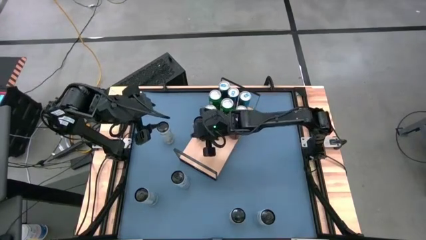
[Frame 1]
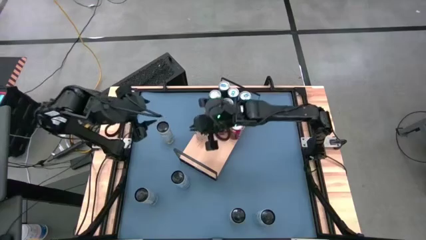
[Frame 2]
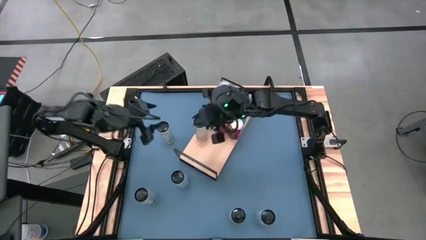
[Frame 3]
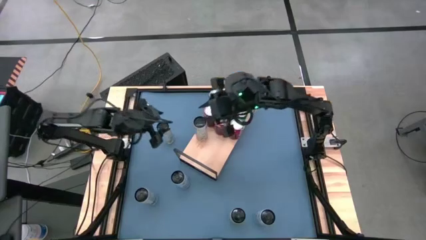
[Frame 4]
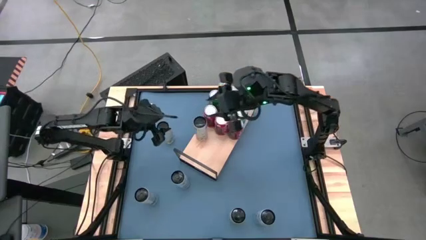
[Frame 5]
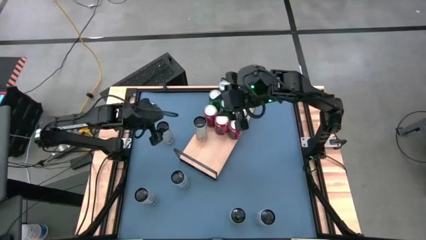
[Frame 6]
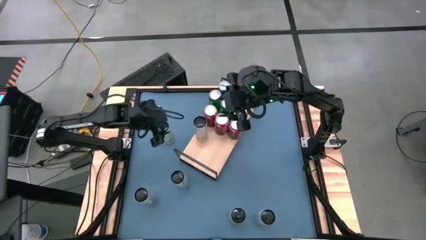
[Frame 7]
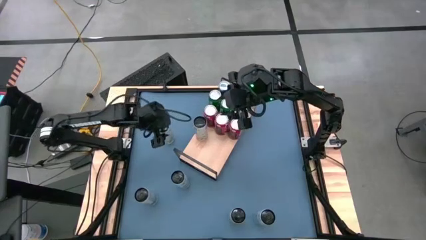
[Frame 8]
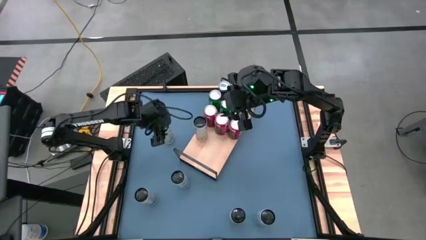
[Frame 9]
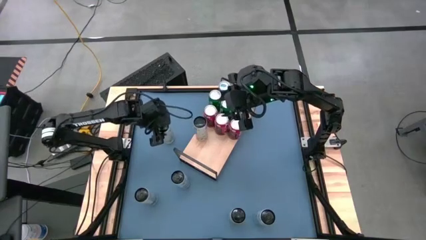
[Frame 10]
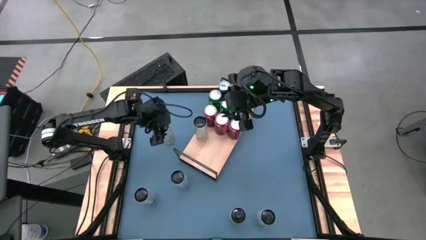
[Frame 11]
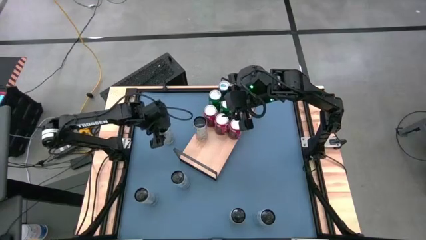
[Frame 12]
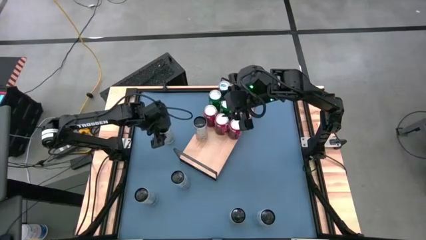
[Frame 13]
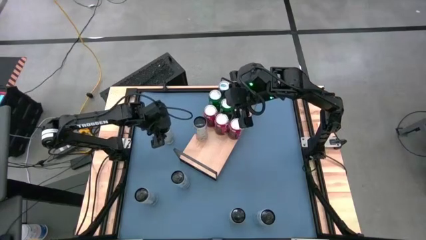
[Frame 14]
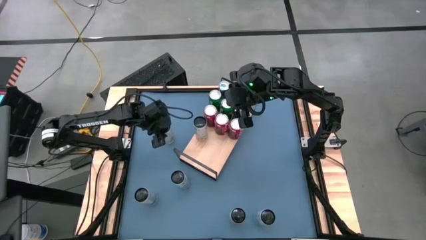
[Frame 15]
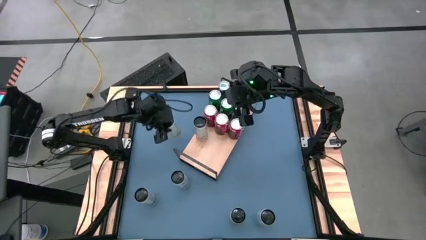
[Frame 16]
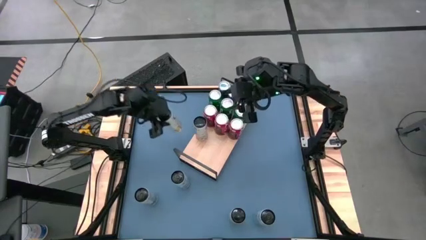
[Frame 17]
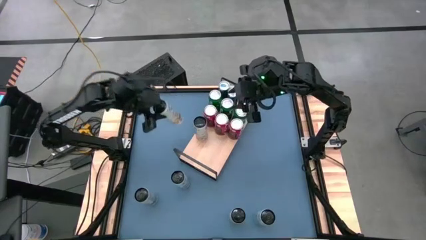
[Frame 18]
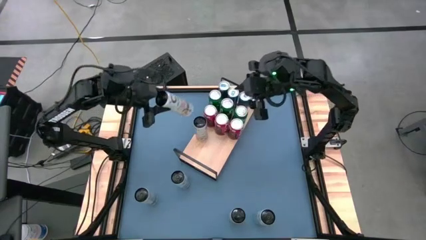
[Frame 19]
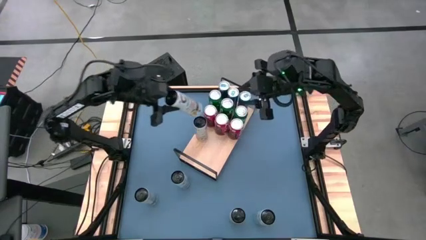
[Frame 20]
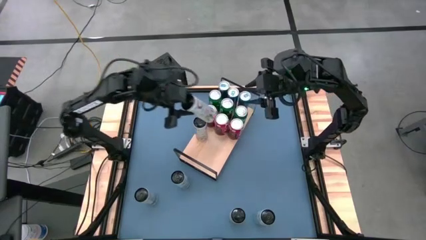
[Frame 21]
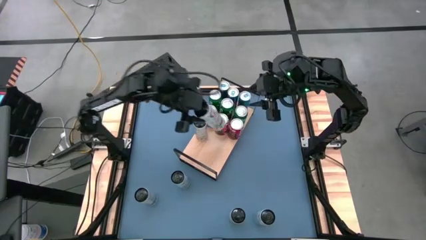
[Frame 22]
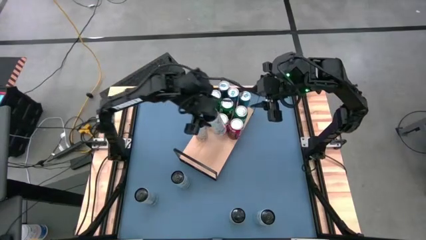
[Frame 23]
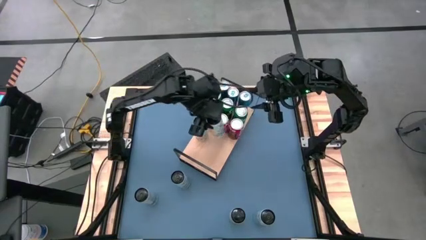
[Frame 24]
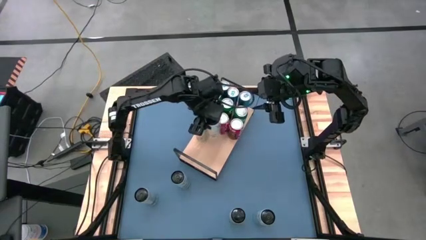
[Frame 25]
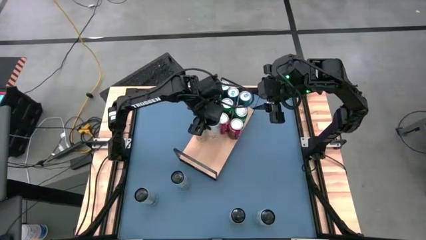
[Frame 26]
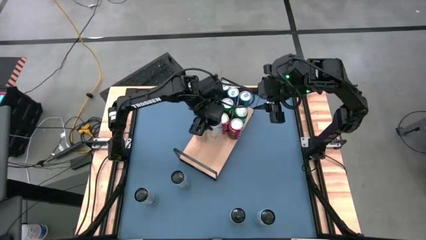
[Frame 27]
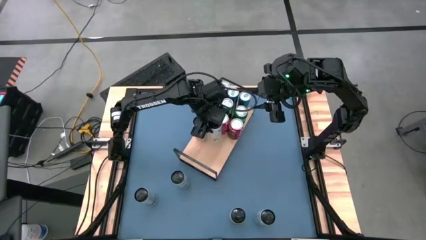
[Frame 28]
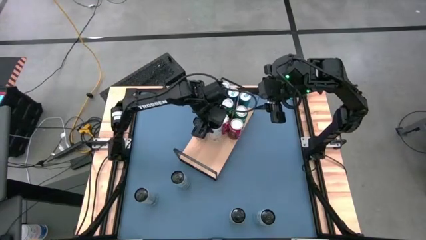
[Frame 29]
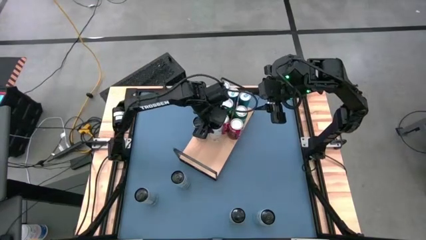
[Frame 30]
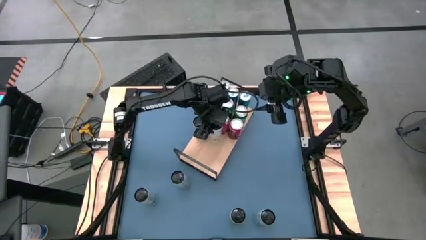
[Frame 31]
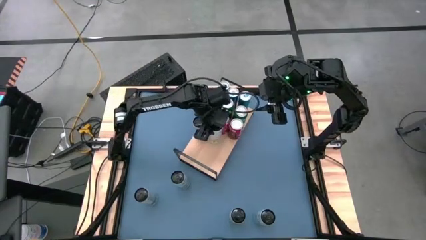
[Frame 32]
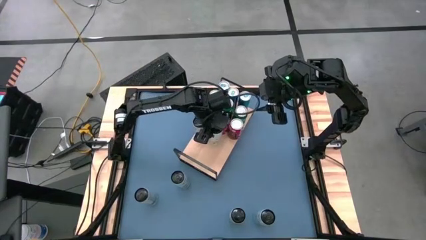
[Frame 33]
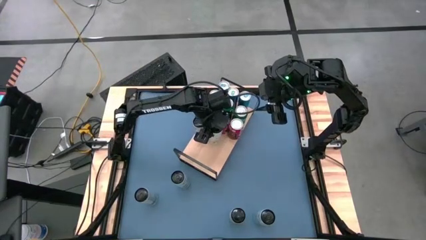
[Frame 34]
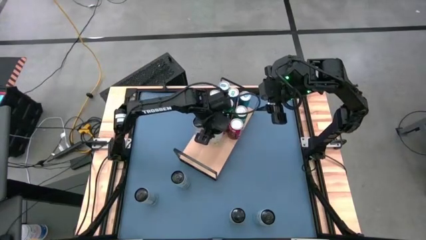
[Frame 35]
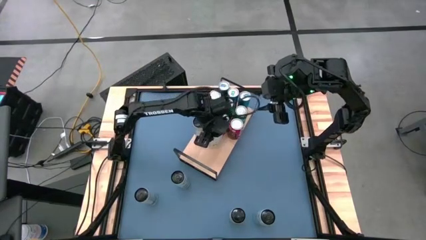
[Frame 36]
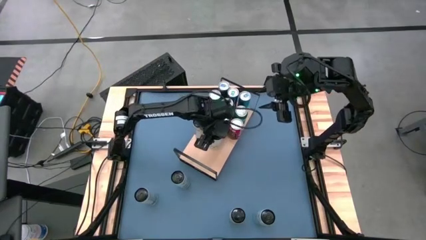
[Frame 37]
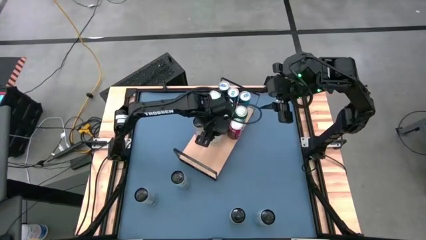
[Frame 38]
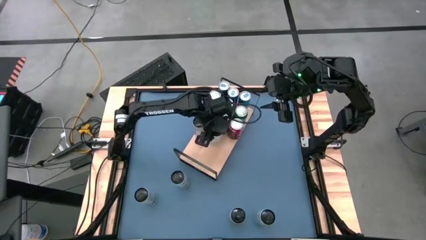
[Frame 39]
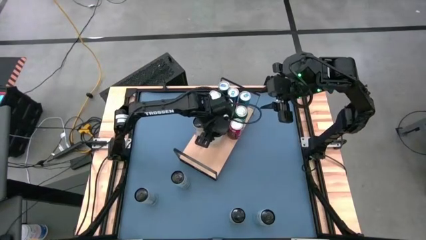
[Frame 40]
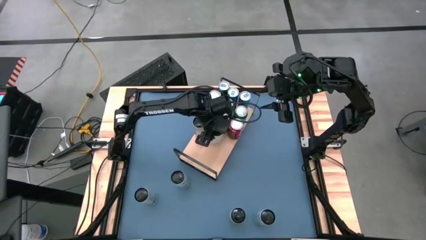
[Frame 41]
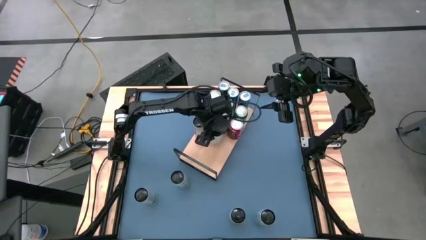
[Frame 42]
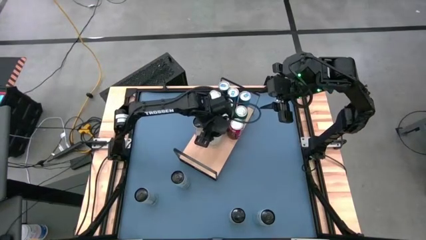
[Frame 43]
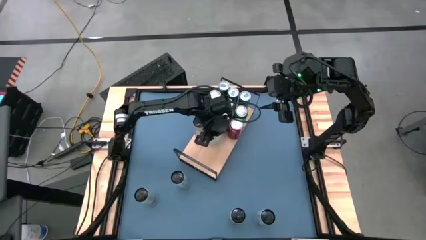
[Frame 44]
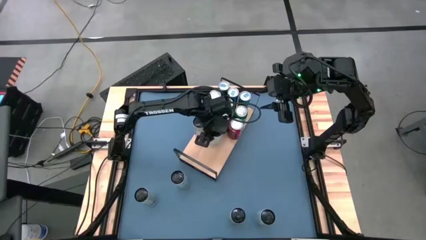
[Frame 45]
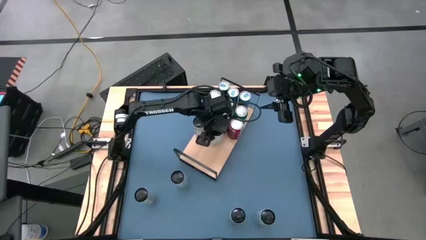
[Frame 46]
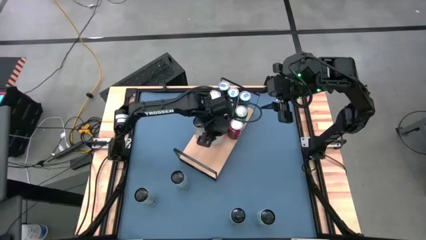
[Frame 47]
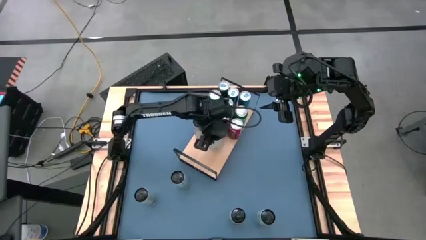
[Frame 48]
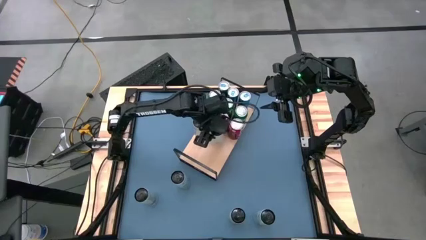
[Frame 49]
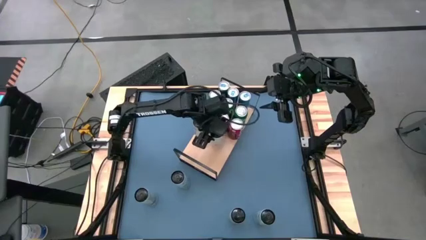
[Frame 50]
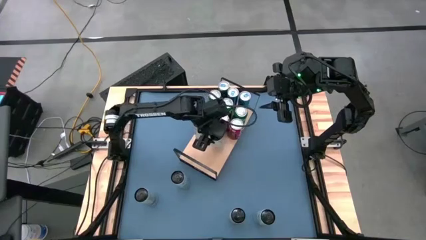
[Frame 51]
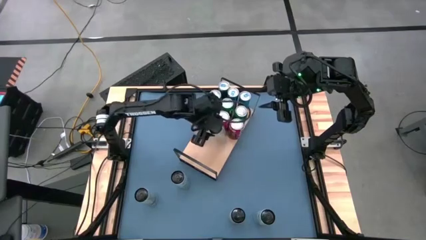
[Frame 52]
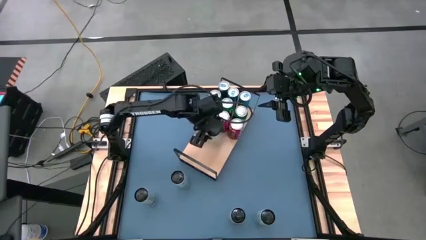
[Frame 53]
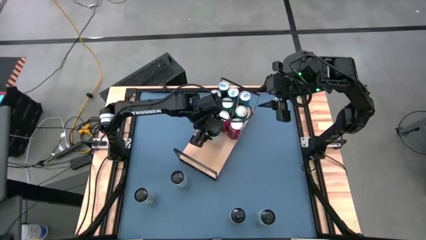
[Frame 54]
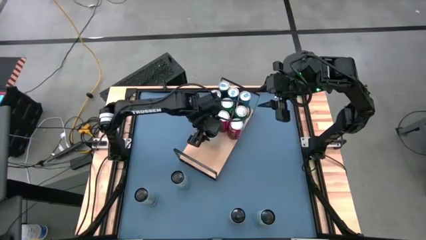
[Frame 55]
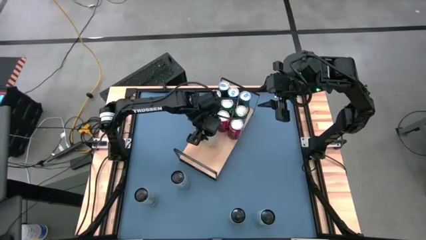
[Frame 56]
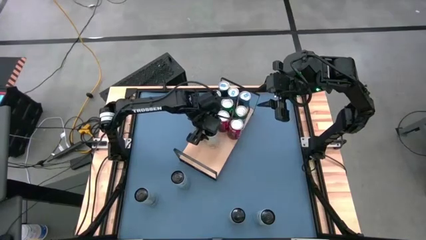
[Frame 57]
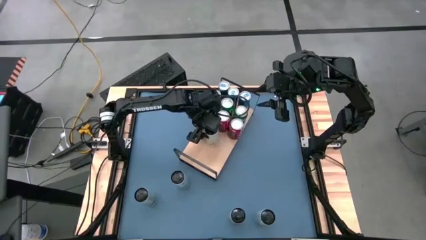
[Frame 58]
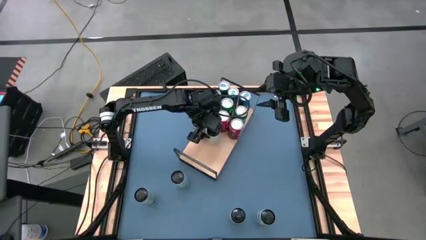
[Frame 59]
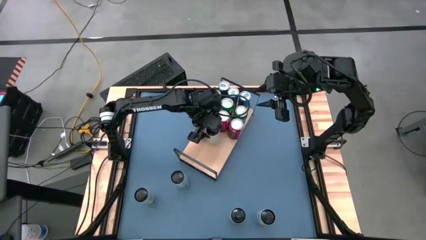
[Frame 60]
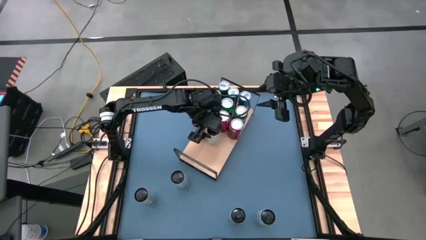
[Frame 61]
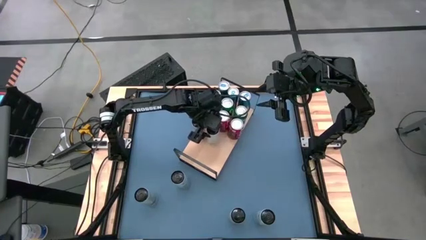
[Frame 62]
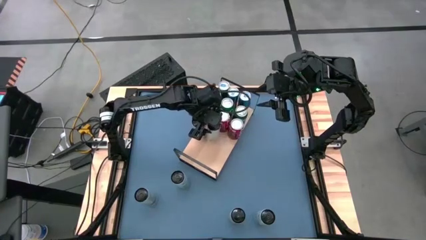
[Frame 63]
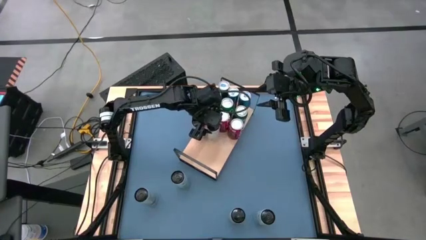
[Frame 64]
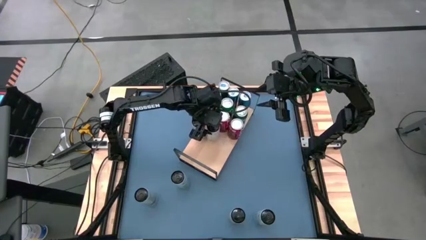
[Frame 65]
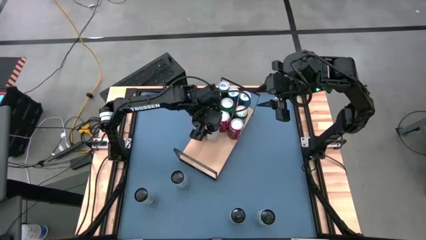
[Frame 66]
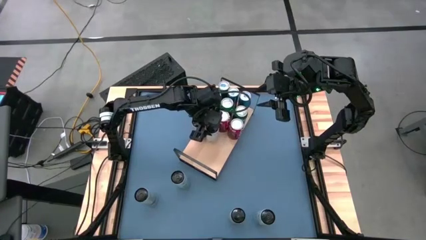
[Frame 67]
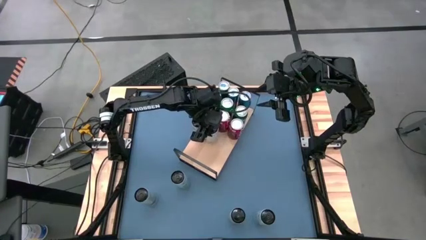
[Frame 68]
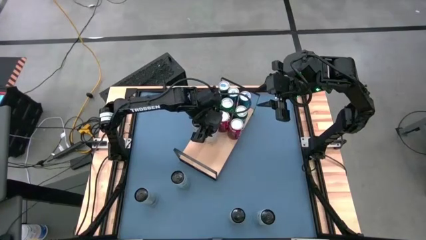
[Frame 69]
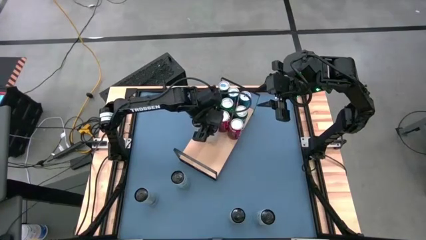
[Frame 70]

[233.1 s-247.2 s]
Task: Place canned beverage on shelf
Put the top white yellow soda can on the shelf aligned with the other white yellow soda can
